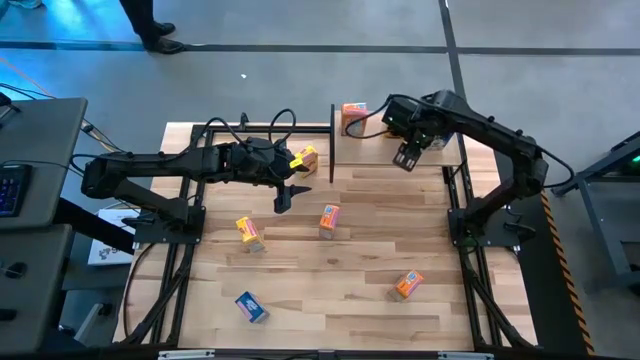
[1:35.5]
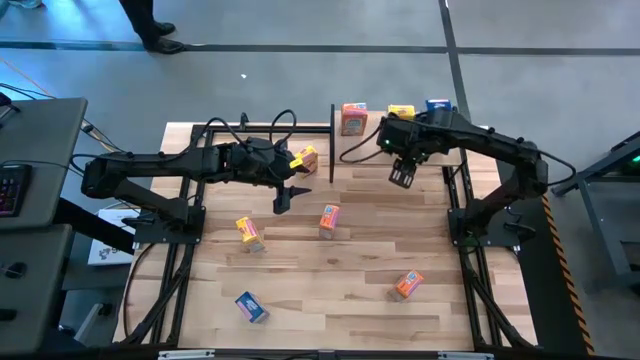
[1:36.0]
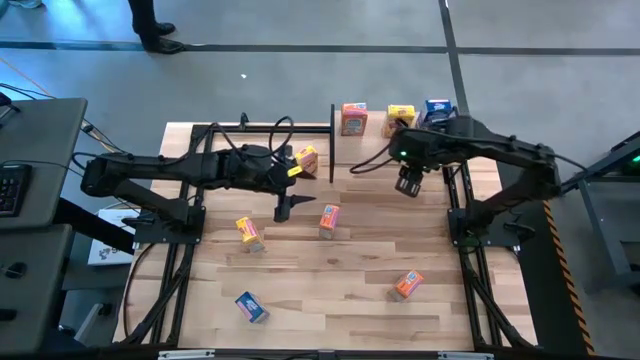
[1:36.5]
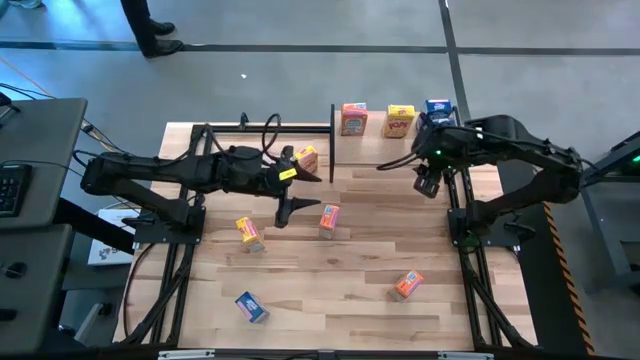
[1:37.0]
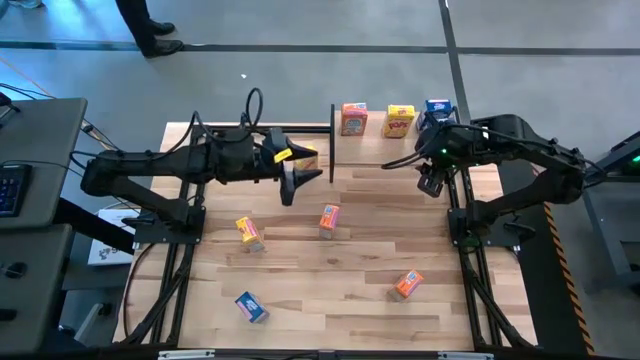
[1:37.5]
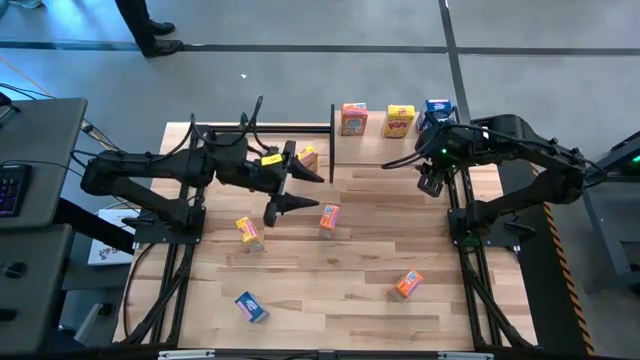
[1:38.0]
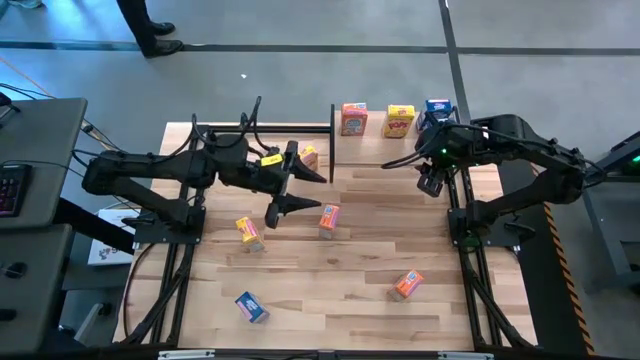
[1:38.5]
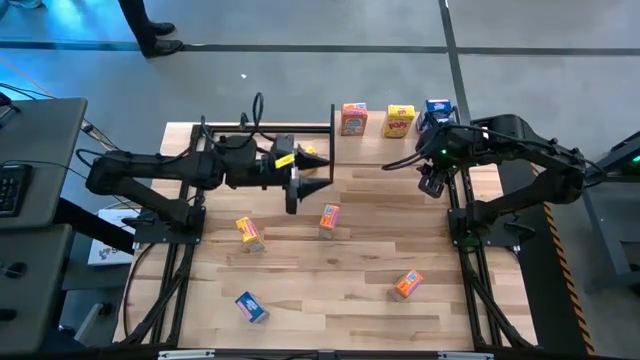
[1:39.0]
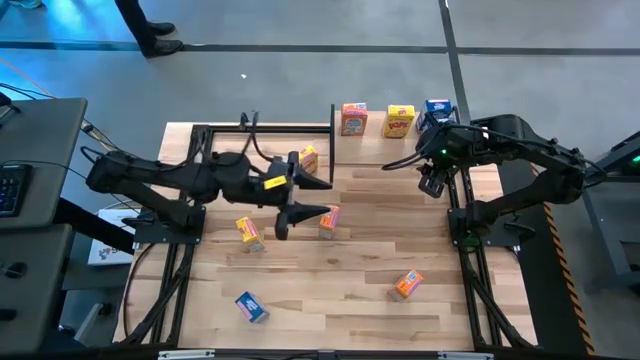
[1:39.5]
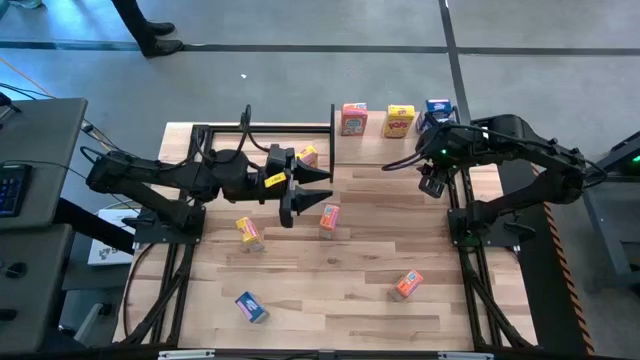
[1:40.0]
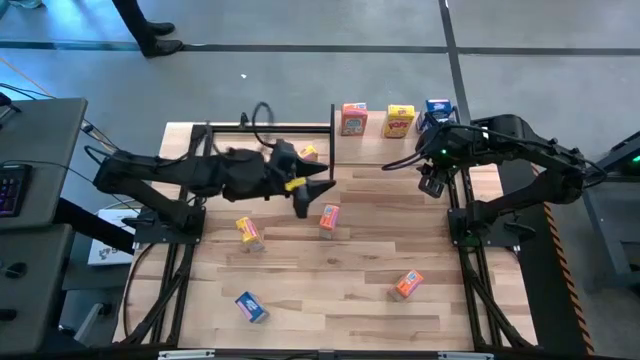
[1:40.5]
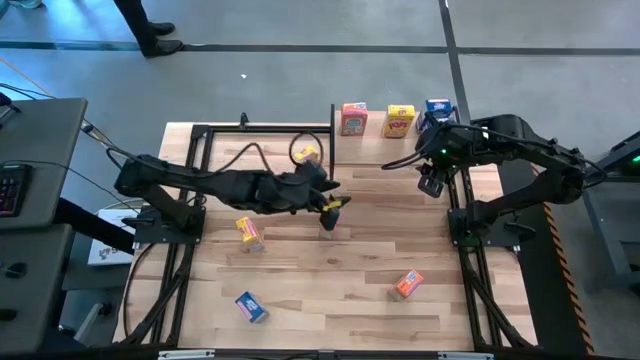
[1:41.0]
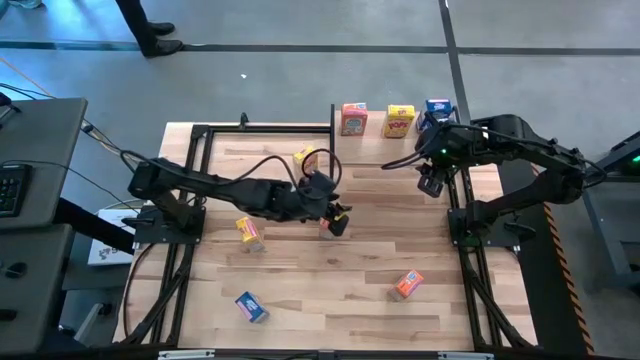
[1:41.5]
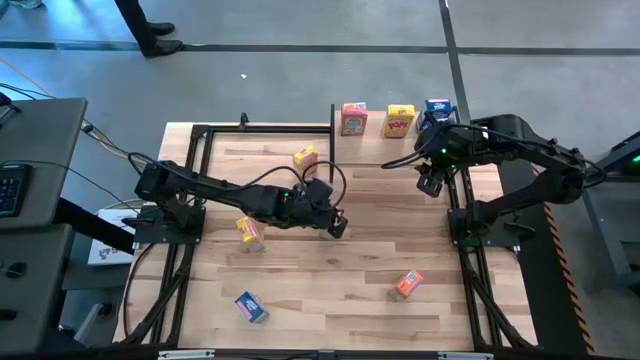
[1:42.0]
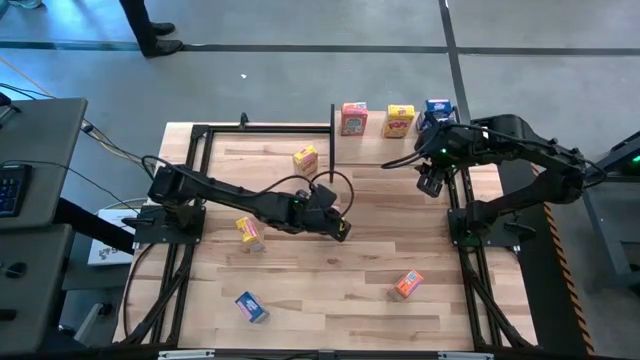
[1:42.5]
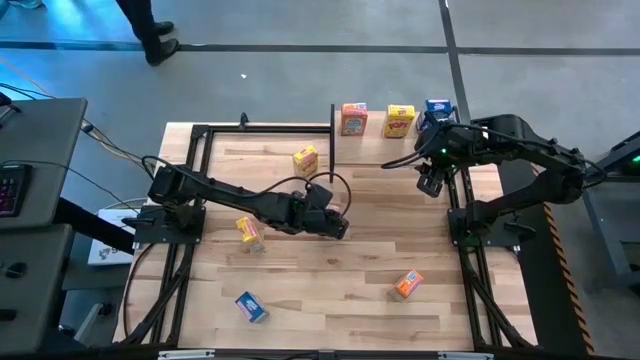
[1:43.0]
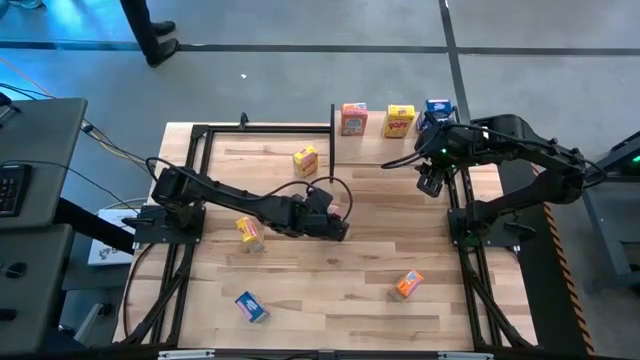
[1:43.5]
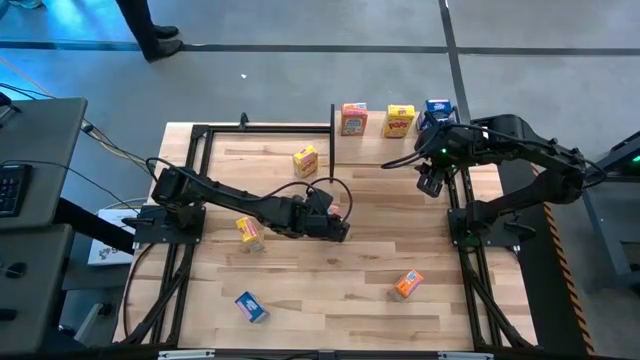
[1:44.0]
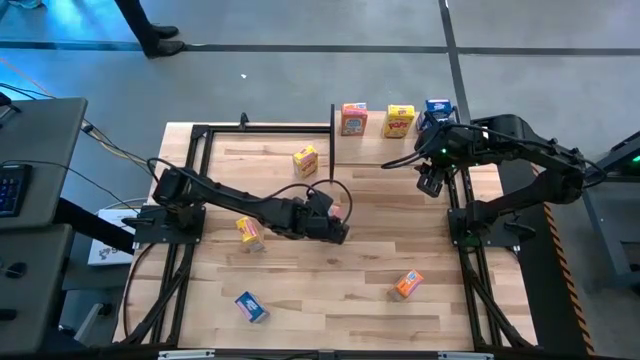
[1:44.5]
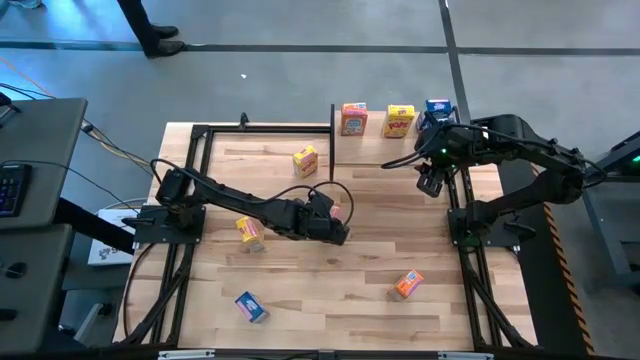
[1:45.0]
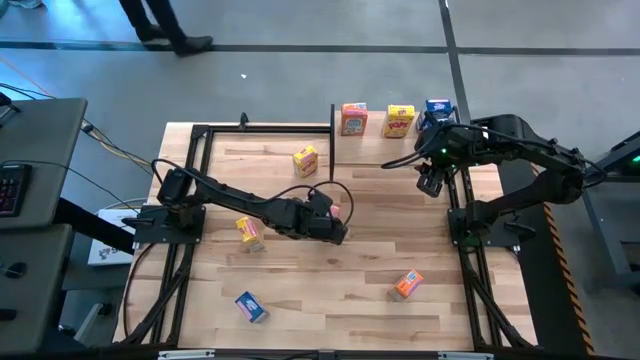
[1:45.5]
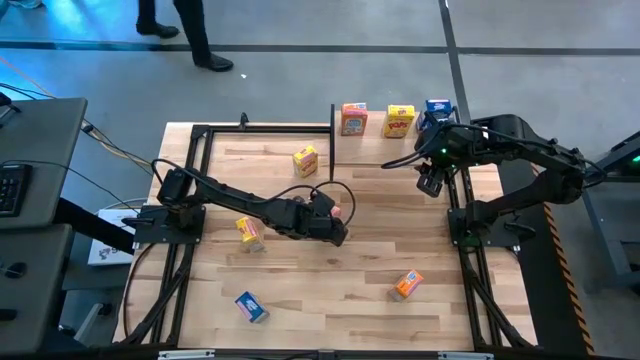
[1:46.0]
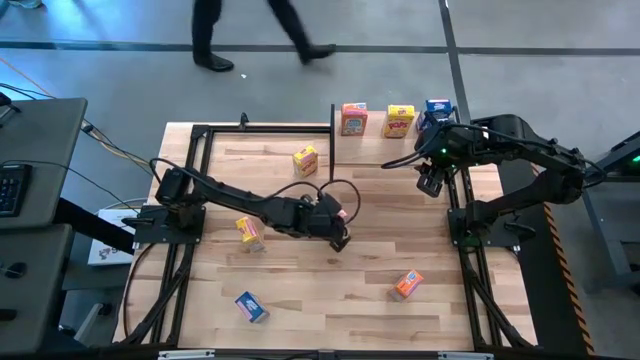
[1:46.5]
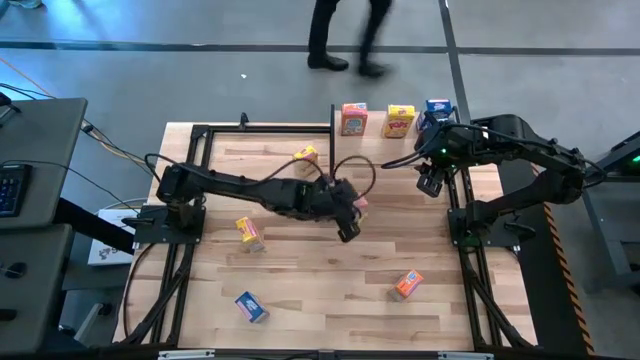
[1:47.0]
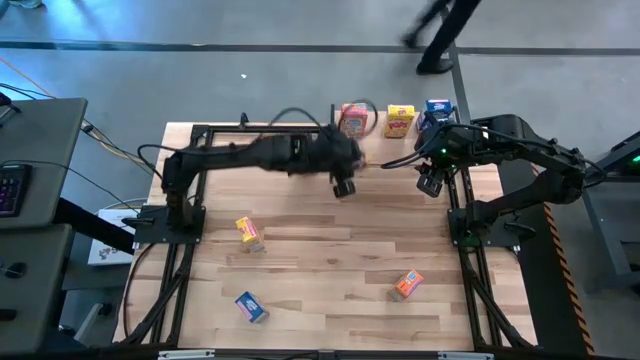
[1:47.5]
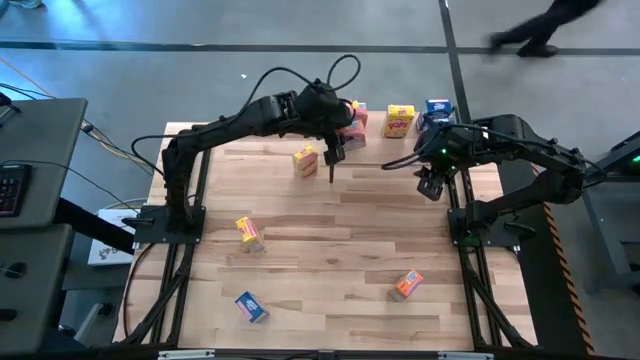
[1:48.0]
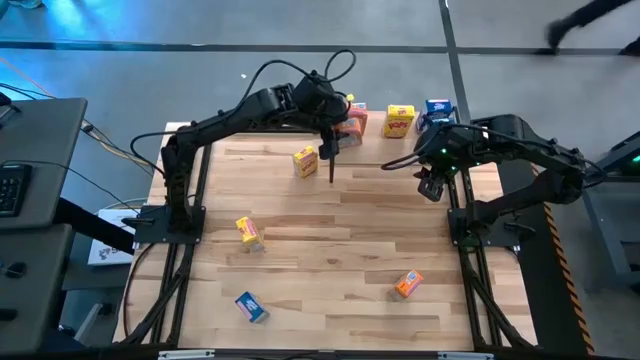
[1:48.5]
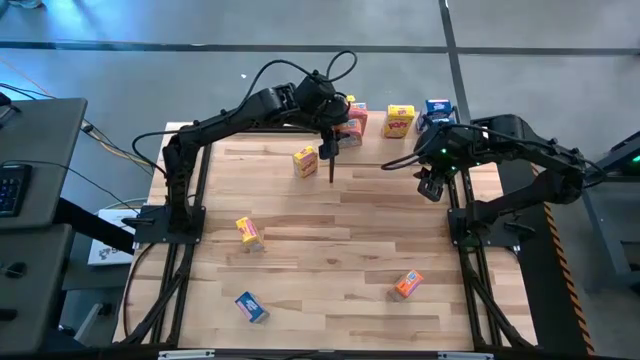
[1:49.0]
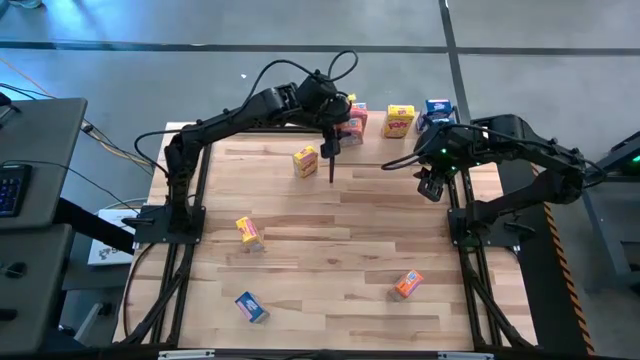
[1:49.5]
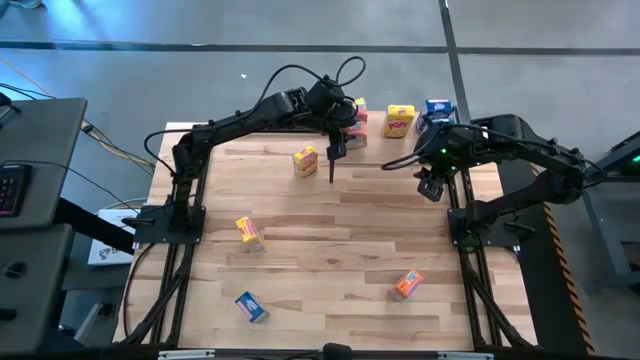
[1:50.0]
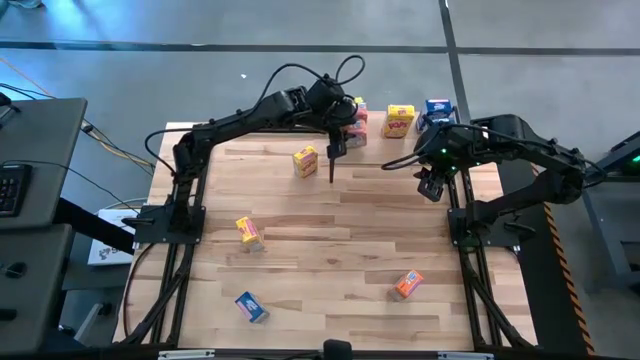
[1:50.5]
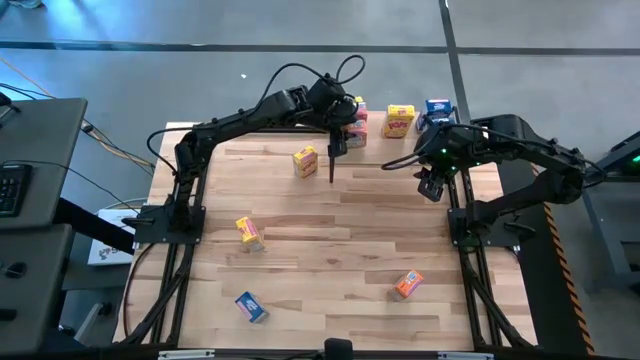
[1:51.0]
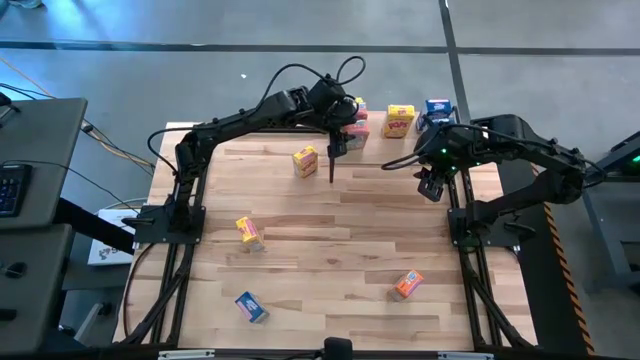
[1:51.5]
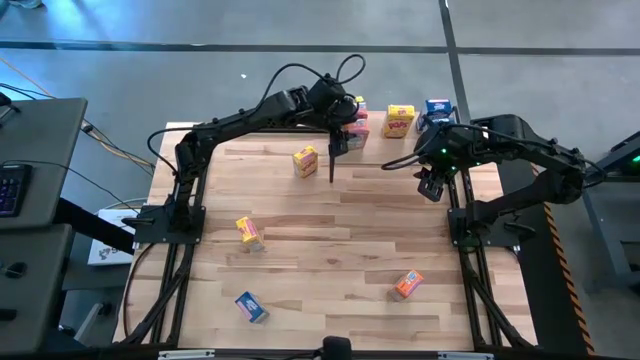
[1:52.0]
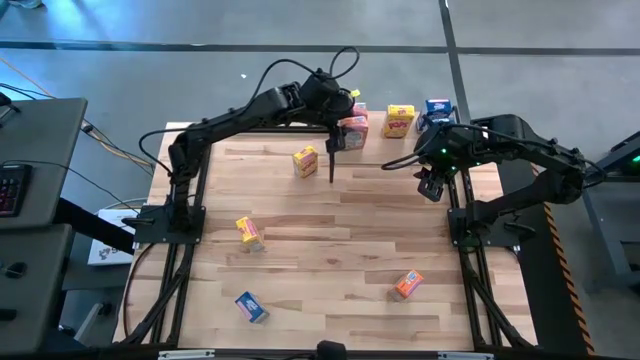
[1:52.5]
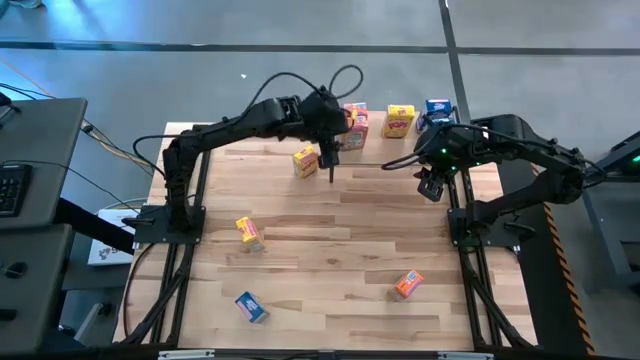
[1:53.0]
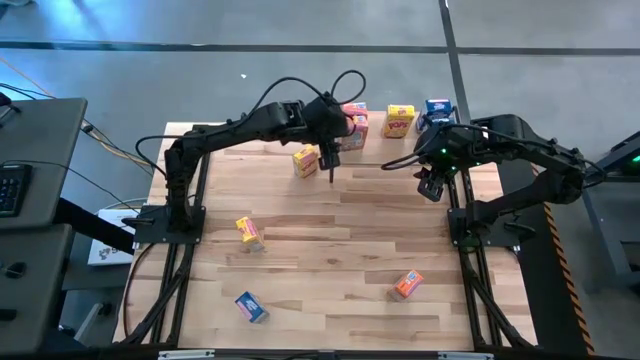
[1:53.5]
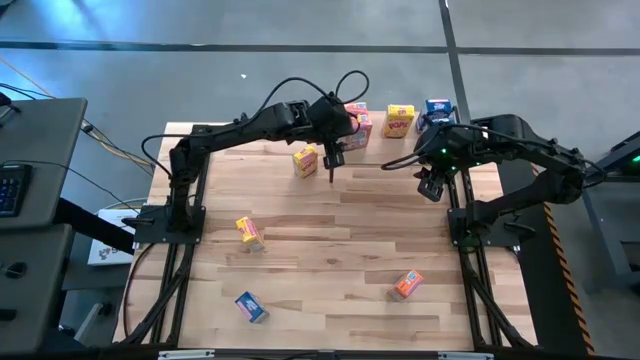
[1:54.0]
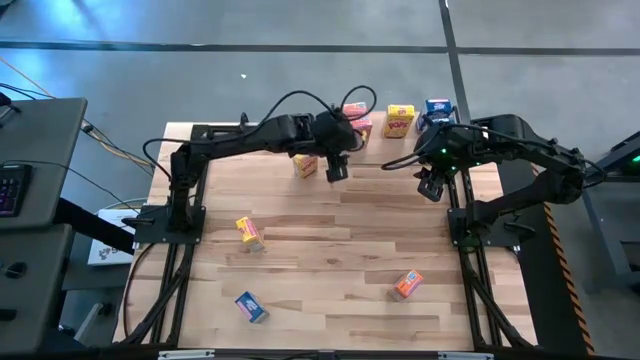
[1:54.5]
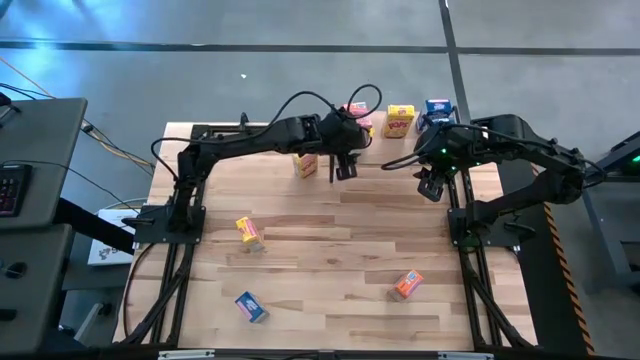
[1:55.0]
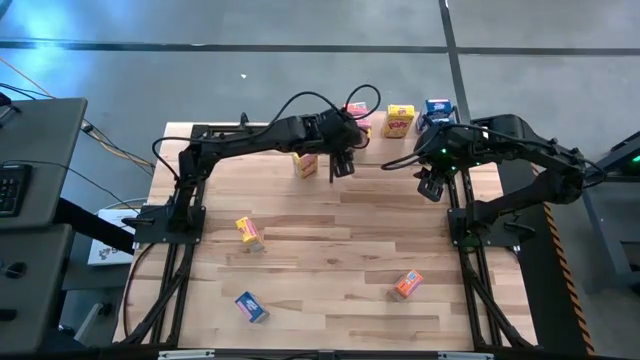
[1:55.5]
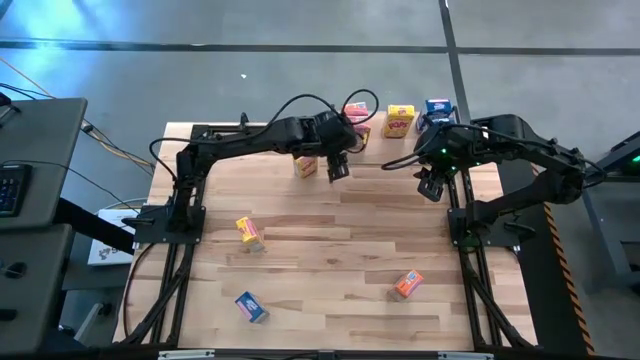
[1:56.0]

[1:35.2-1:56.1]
Task: Stack cereal on shelf
Put the top orange cereal box on the shelf aligned with the other orange cereal box
